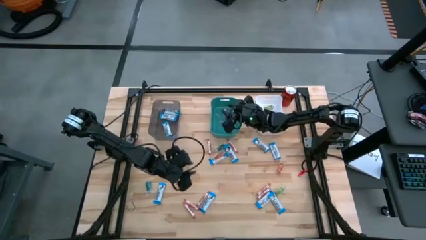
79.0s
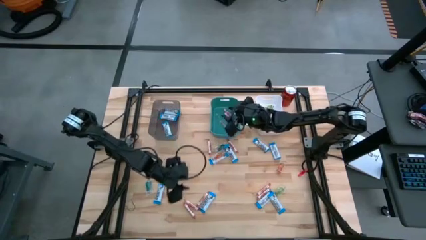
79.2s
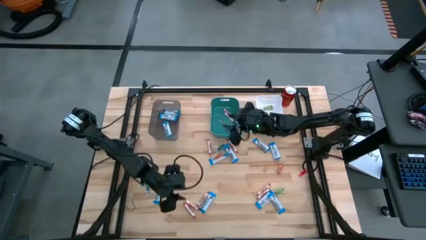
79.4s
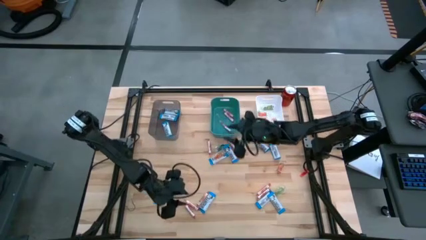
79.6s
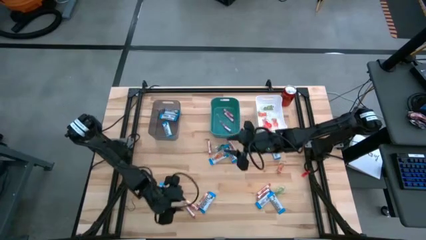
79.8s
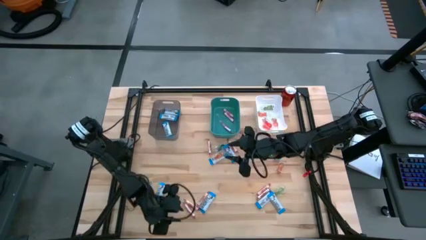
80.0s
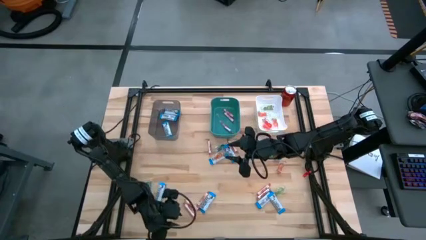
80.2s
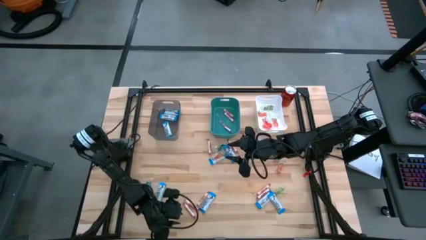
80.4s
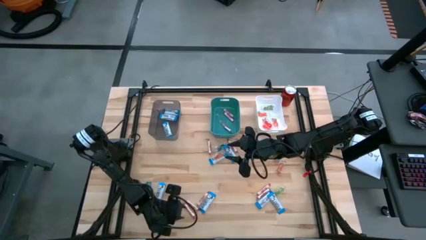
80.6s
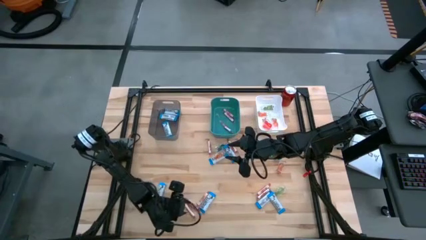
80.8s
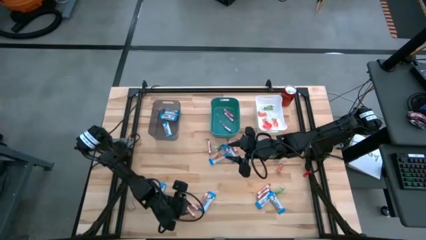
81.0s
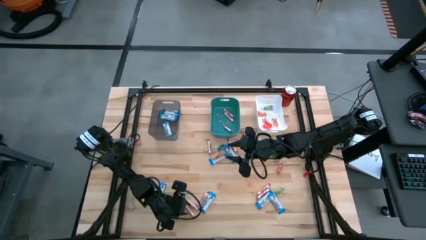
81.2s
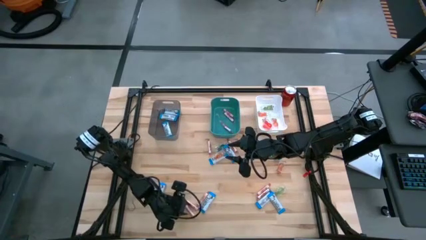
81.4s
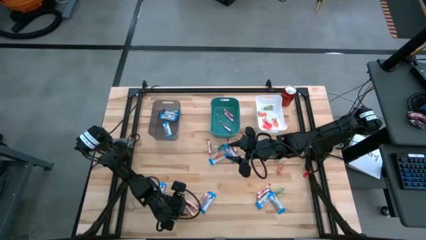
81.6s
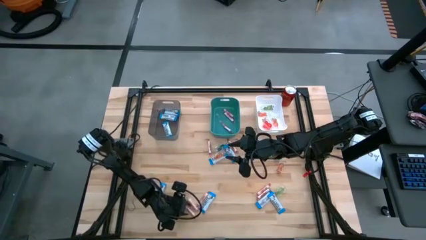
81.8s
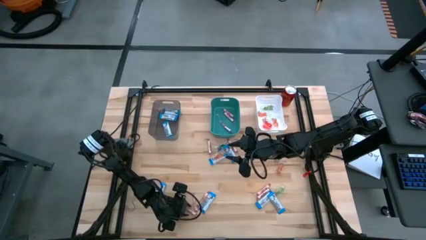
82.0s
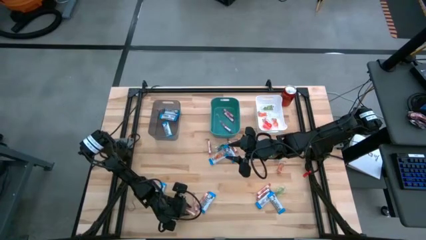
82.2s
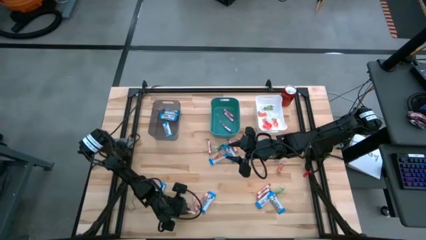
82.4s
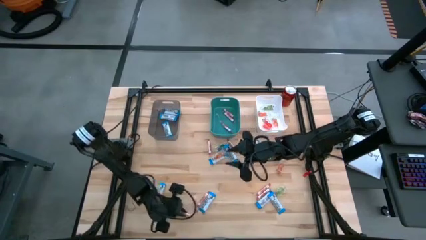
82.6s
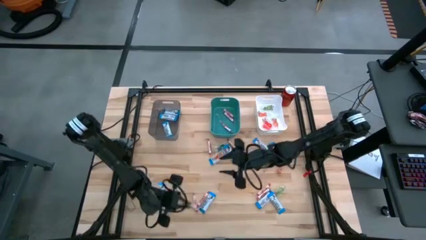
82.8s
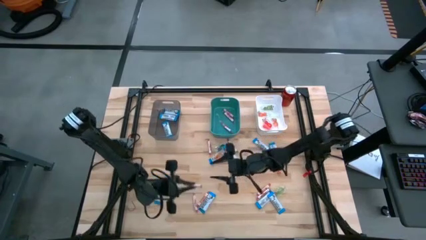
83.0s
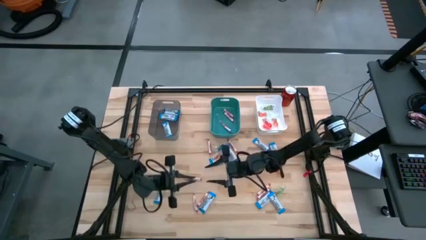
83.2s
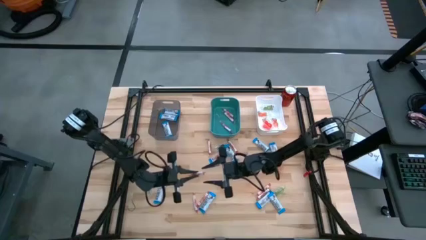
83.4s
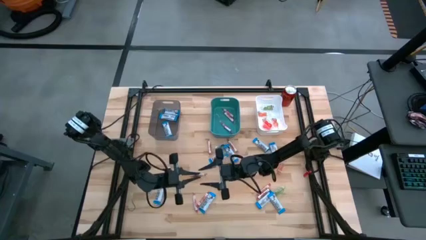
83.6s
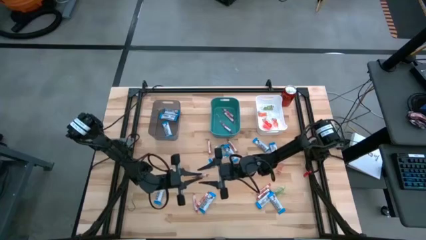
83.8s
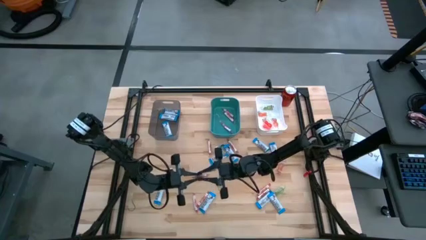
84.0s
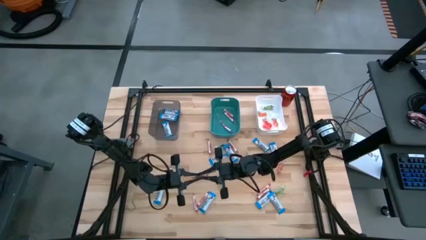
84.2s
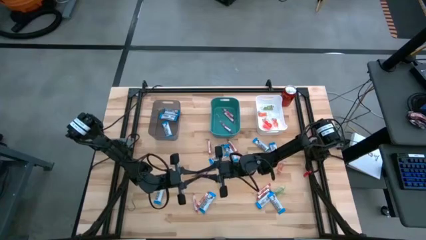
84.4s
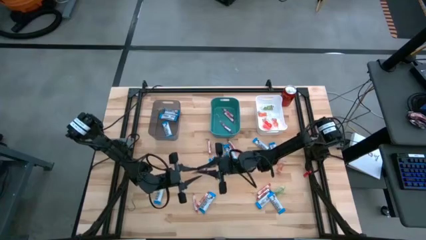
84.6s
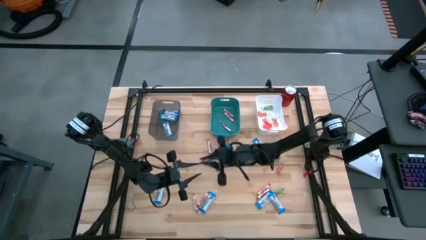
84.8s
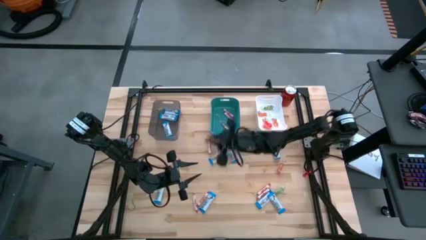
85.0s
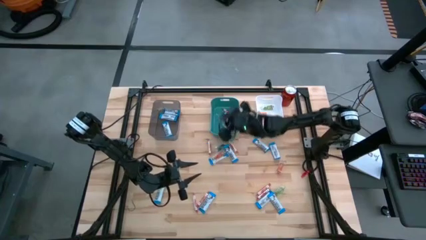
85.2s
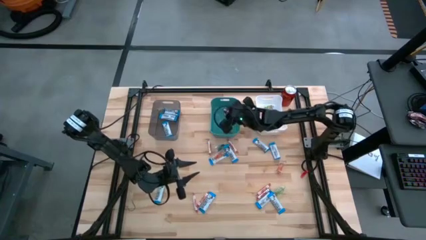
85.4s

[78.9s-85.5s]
Task: Sort candy
Put the red candy into the blue bin

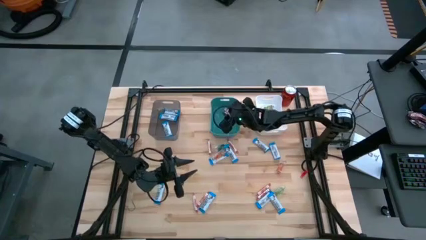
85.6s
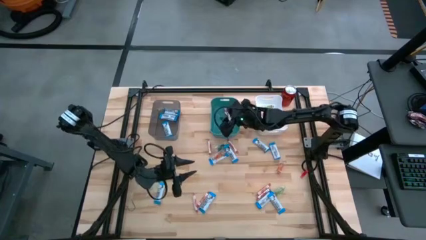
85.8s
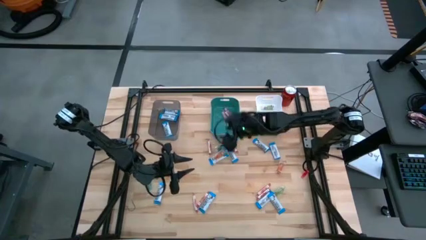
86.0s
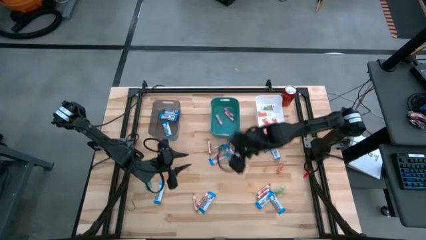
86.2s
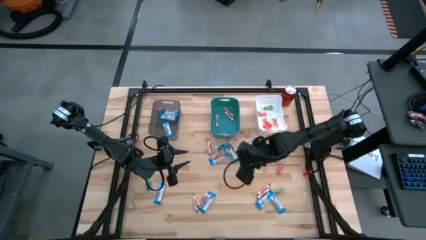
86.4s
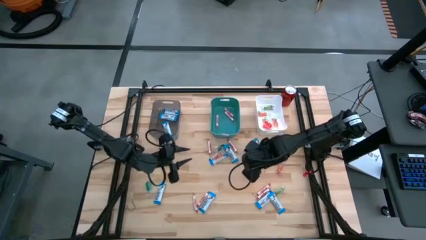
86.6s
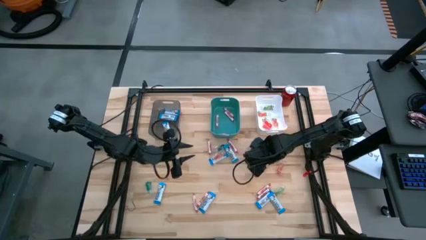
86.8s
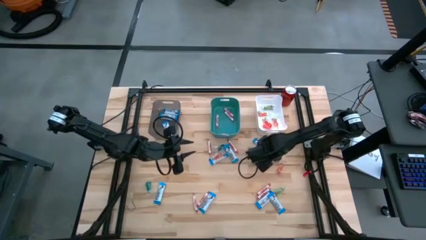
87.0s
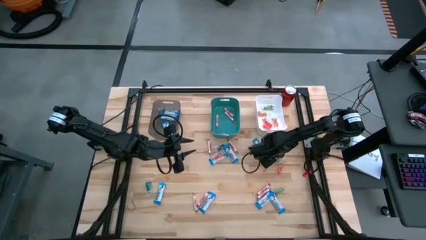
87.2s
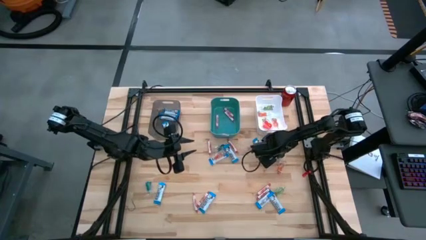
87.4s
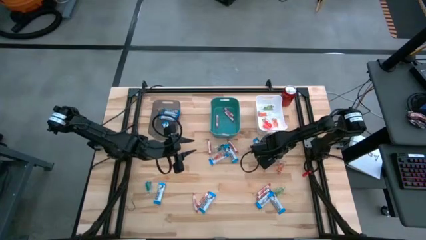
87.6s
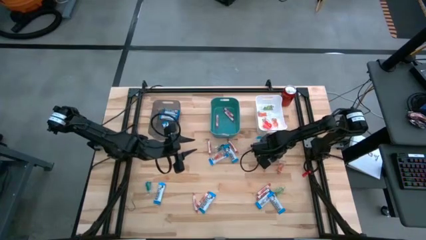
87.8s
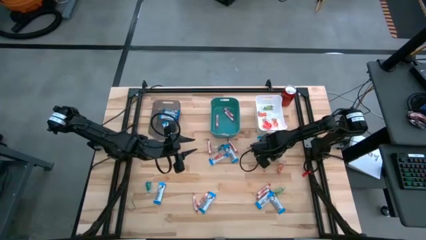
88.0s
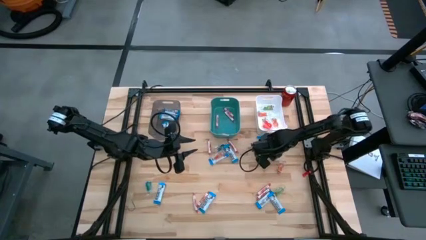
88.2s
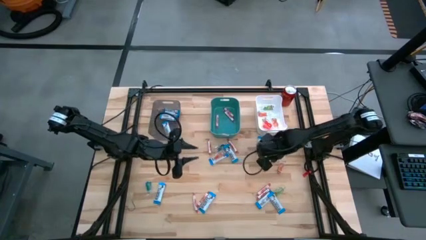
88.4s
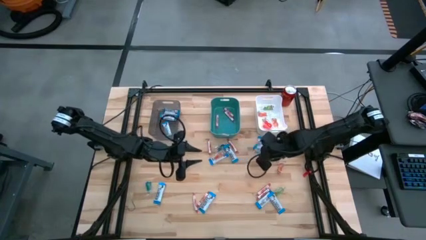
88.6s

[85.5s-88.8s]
Put the white chocolate into the black bin

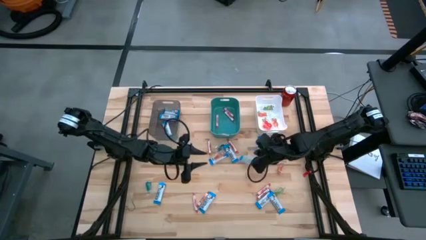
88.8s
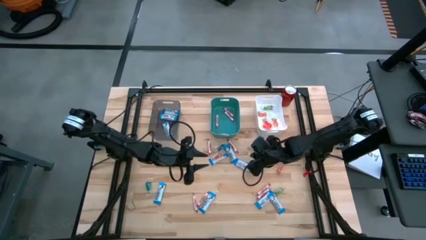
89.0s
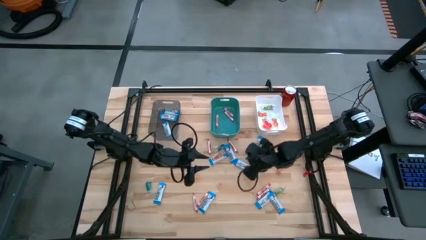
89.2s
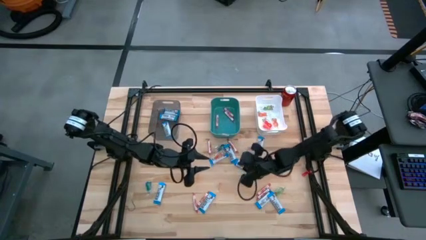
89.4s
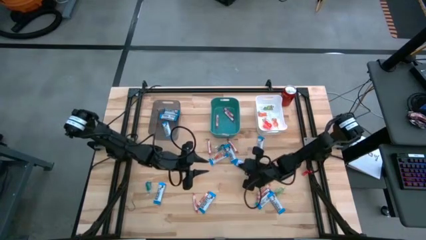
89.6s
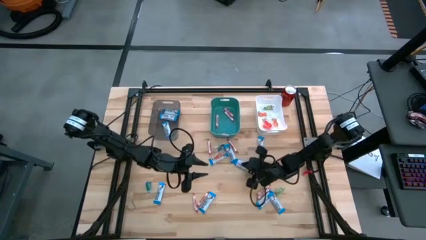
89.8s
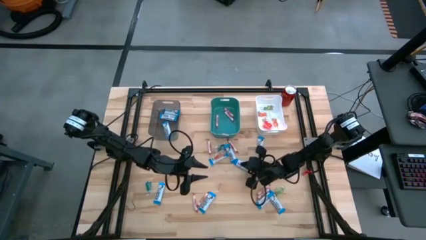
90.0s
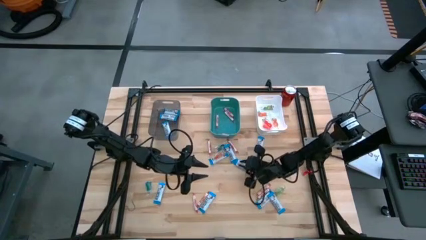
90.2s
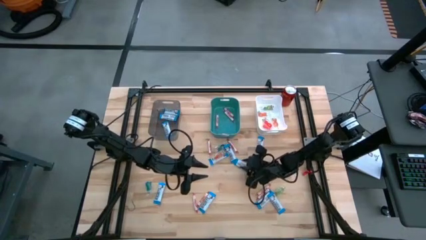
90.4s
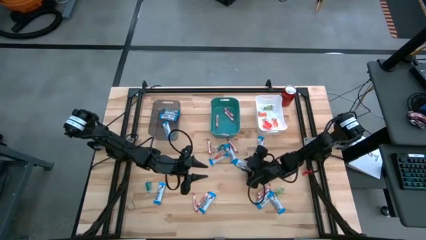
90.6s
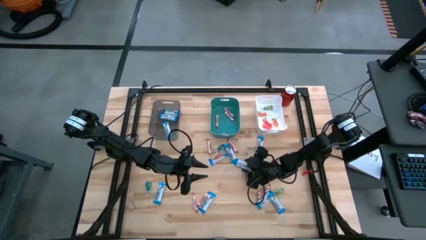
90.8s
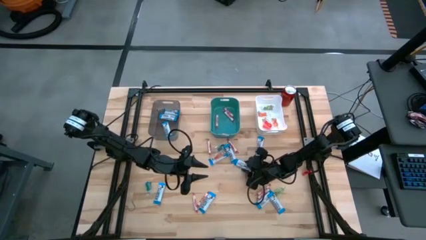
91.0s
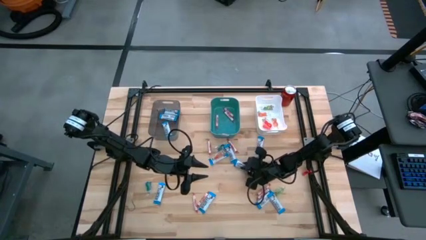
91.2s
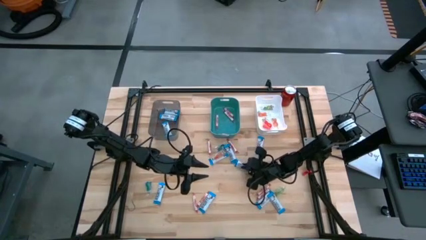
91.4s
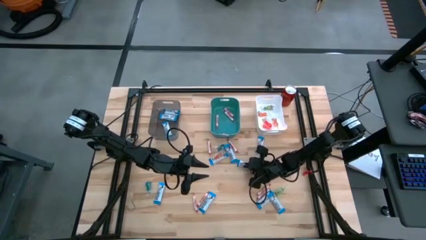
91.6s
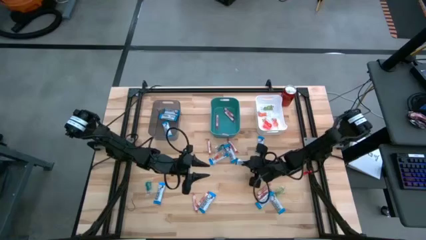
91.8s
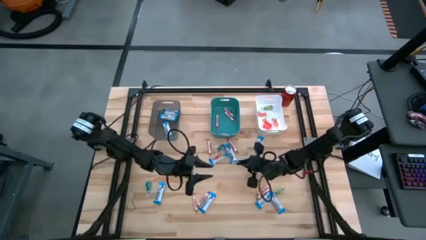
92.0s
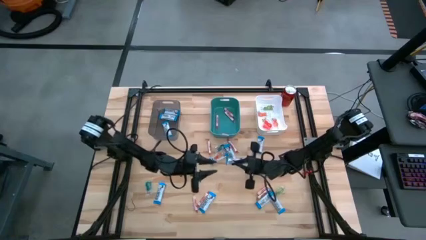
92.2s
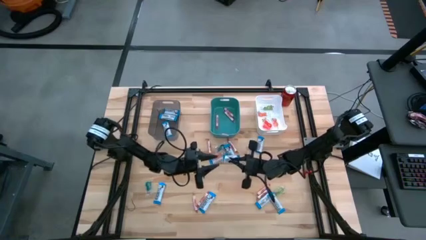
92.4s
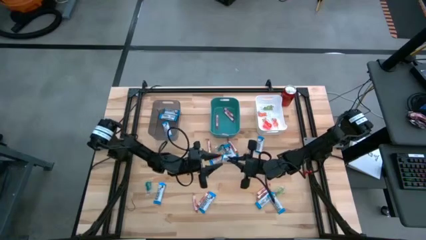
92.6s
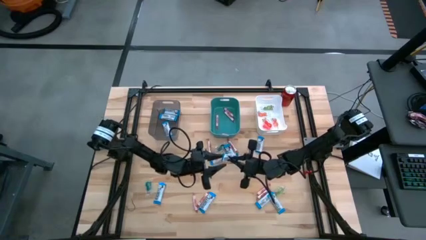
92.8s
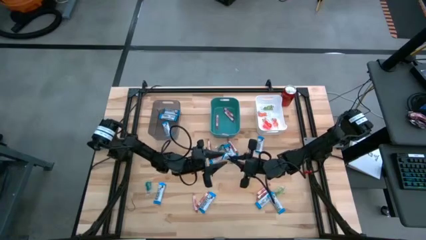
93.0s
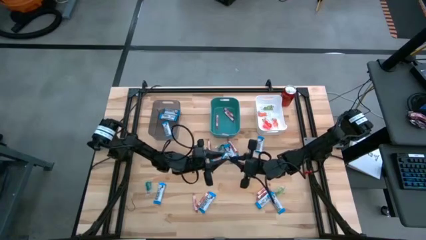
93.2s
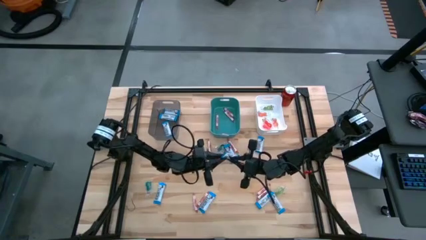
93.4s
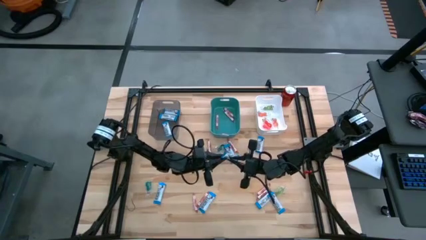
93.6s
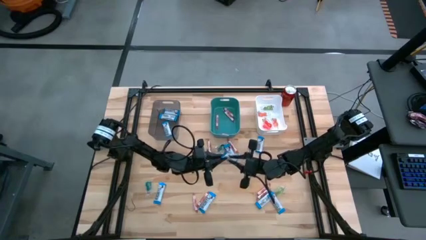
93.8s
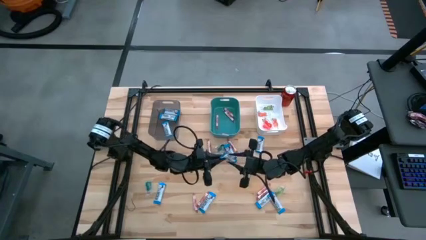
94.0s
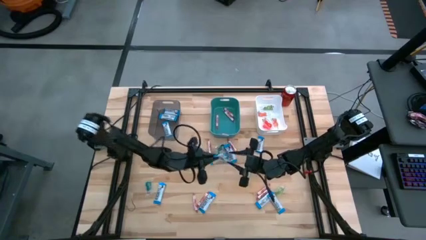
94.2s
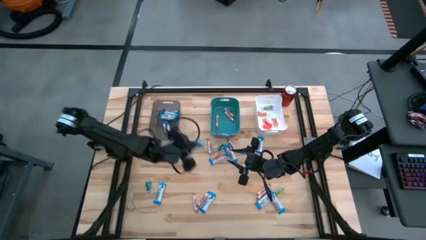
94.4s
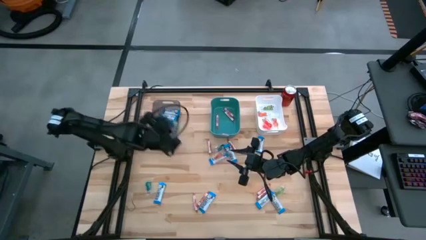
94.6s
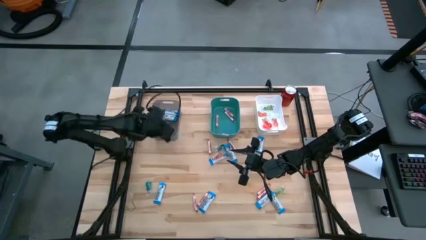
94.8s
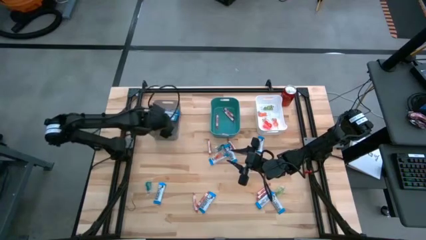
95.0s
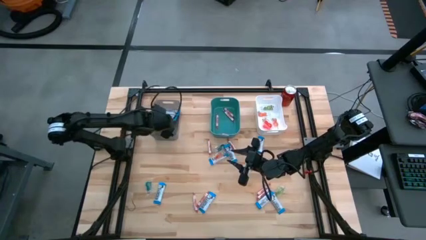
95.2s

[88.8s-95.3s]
Put the white chocolate into the black bin
